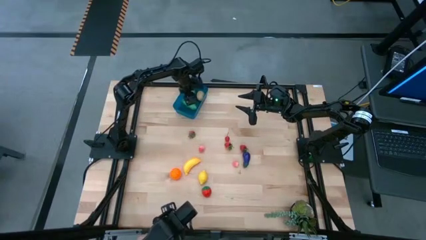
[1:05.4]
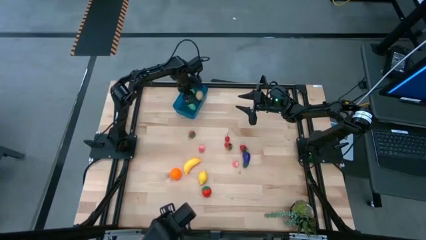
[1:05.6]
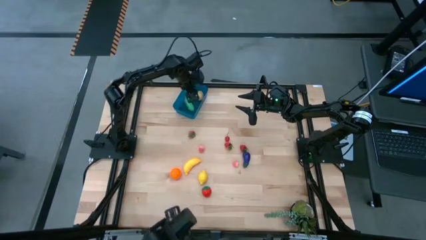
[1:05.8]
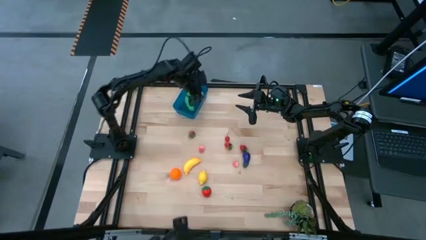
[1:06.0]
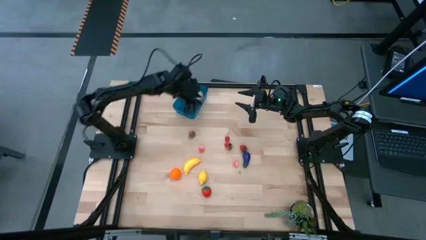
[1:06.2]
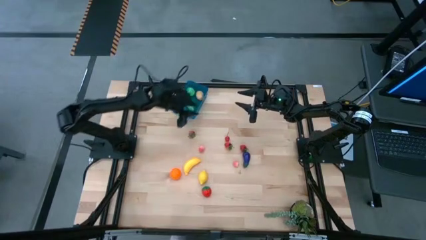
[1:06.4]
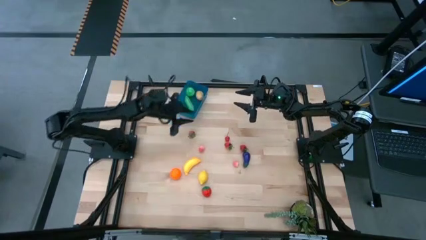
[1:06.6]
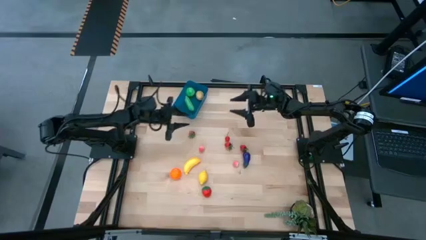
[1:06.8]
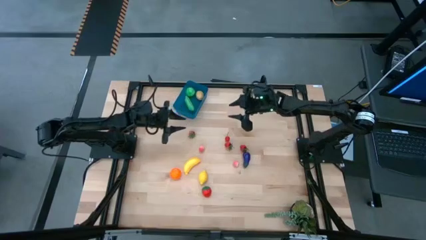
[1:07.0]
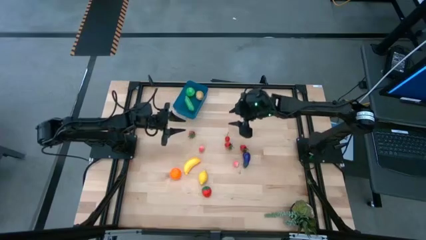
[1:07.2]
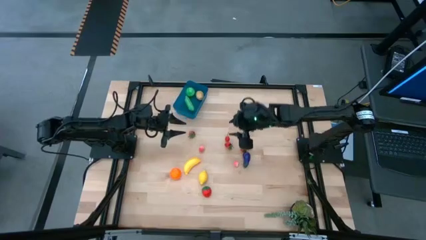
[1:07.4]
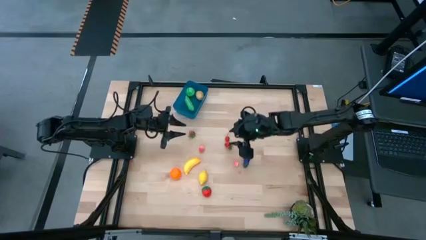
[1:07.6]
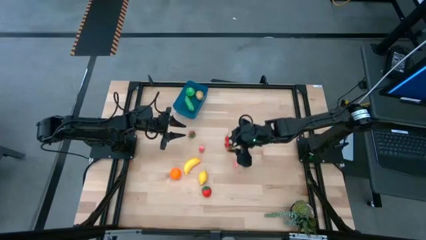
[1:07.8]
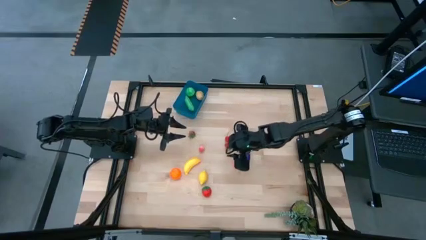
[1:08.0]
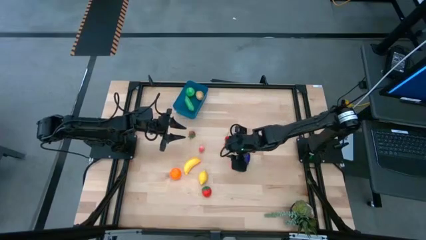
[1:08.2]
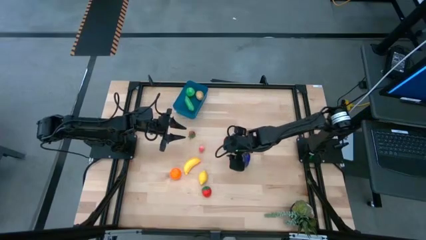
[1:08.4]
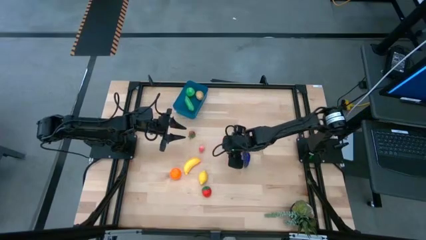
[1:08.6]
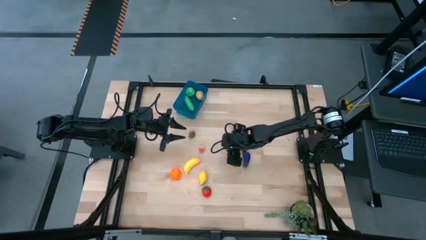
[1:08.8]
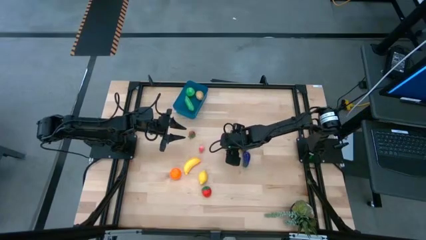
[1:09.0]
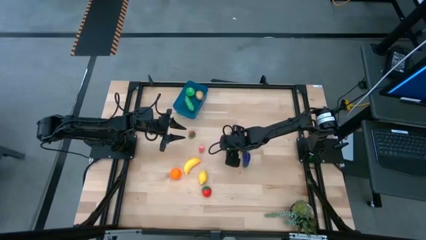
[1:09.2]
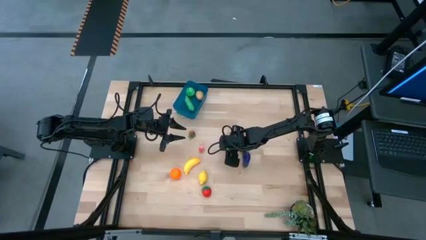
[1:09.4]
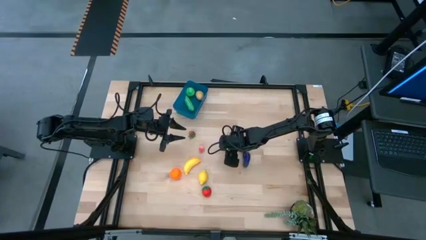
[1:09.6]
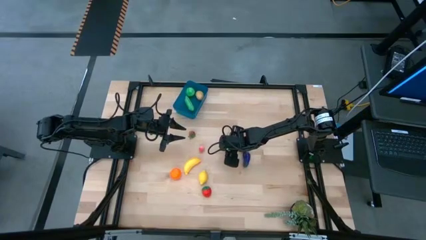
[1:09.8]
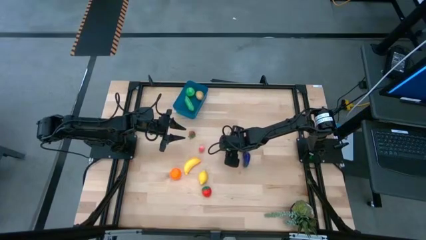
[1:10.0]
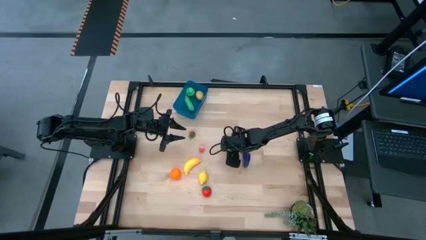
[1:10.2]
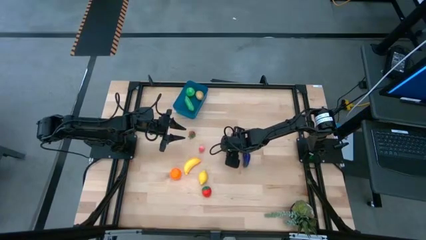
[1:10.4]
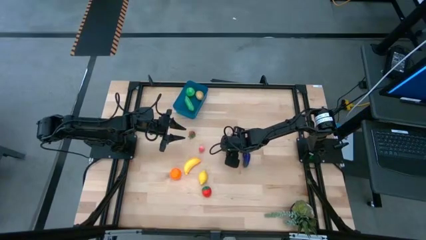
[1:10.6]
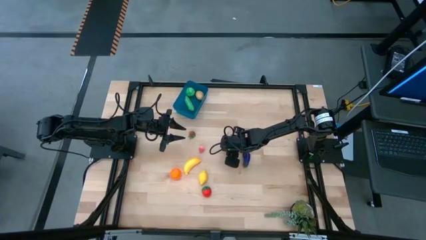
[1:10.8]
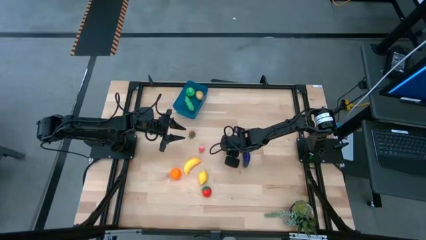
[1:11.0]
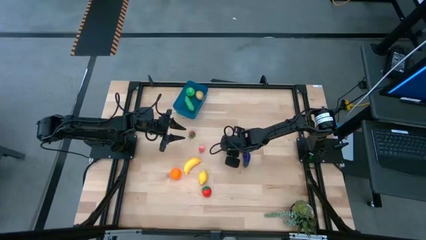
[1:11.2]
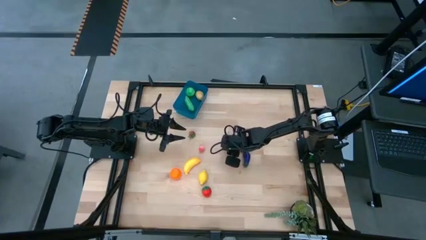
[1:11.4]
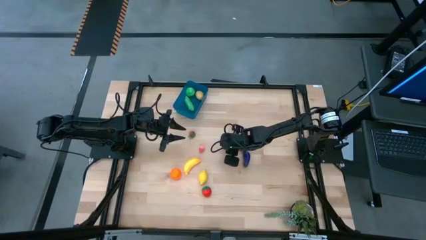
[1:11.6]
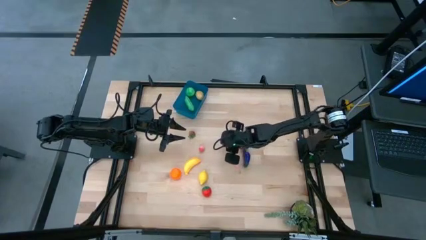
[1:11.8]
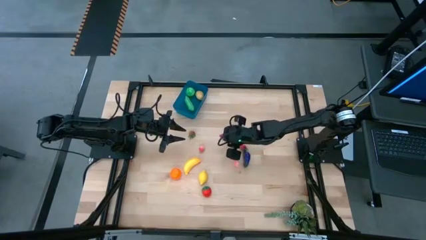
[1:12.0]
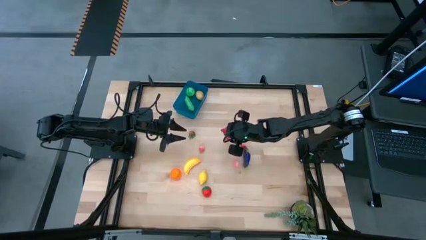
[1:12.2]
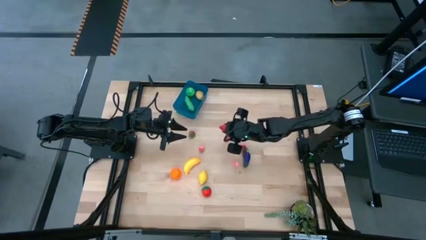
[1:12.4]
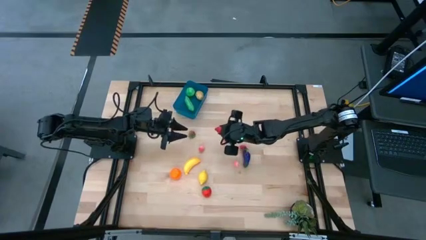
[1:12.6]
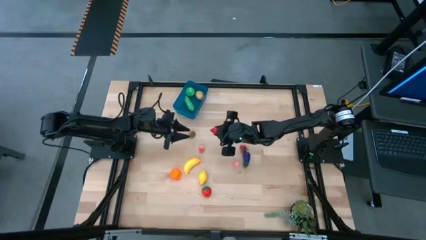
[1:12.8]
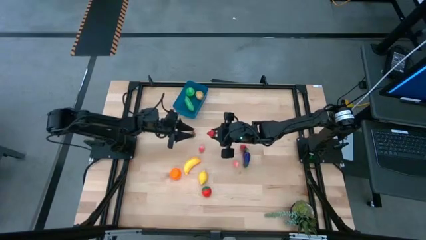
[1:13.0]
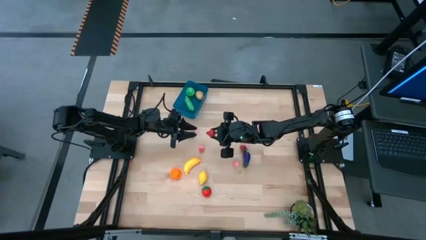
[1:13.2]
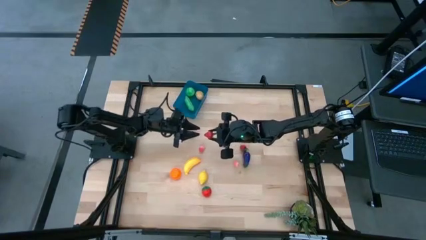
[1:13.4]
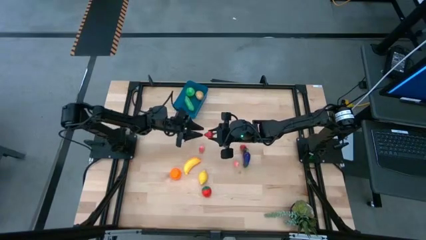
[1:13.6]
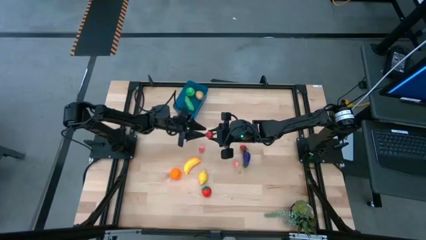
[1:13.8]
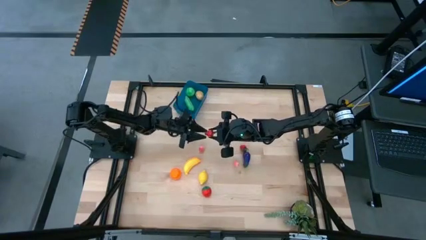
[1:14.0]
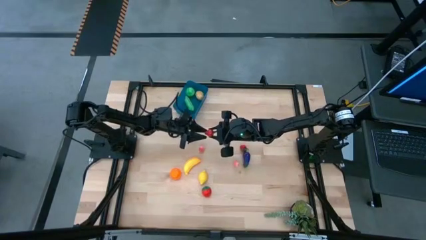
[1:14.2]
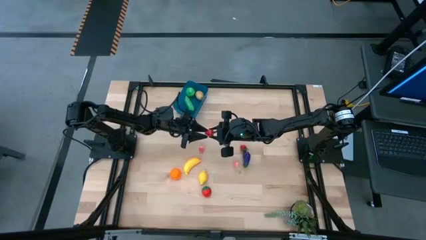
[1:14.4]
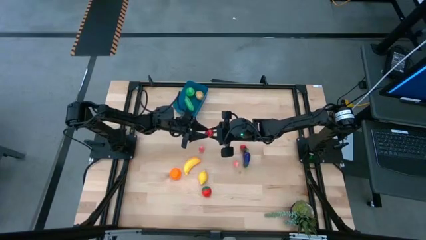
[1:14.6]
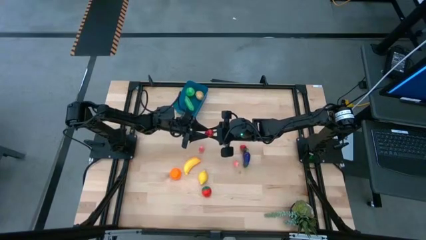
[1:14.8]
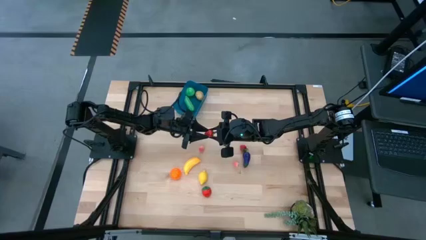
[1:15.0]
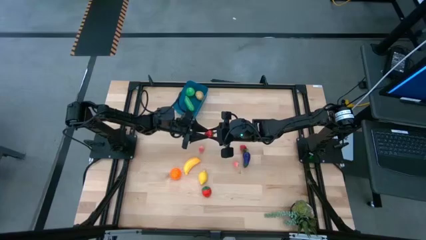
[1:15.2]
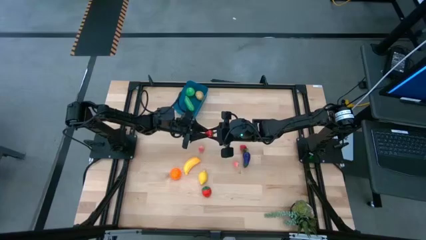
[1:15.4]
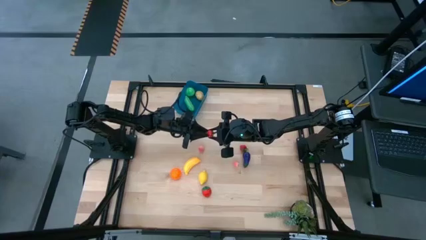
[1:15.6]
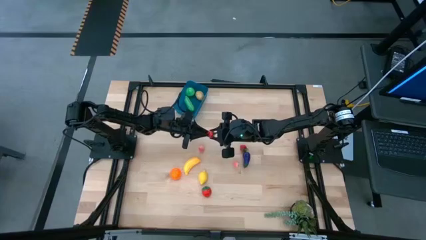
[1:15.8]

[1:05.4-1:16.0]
Task: Pick and placing Produce into tupperware
Put the top middle red strawberry into the blue bin
